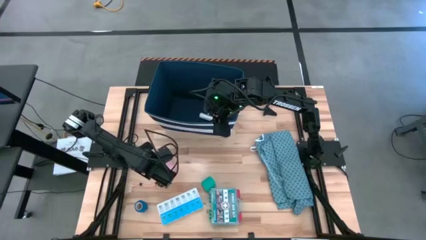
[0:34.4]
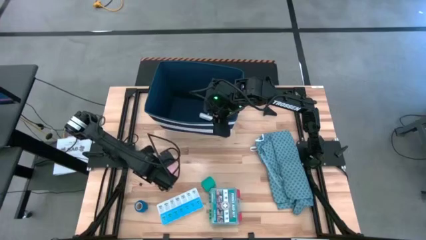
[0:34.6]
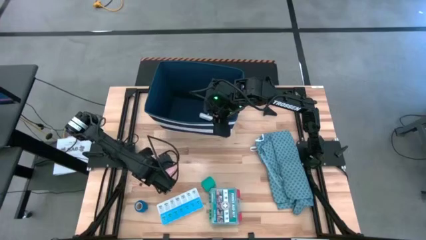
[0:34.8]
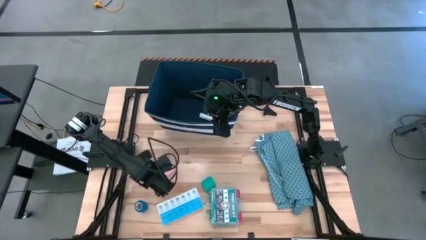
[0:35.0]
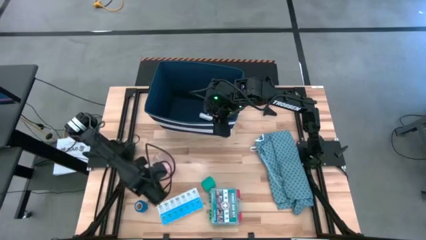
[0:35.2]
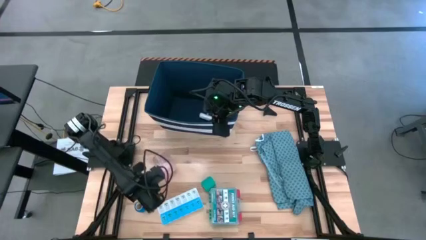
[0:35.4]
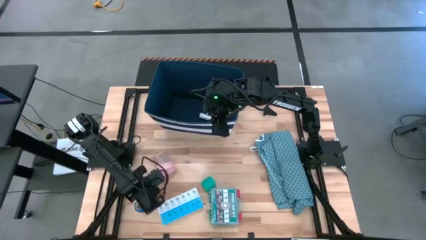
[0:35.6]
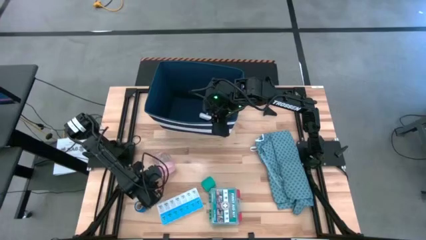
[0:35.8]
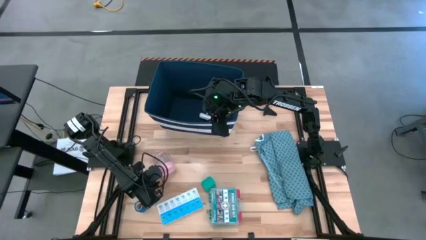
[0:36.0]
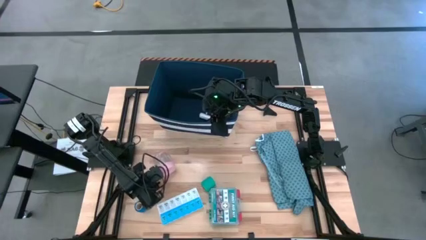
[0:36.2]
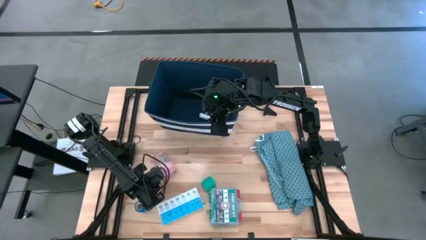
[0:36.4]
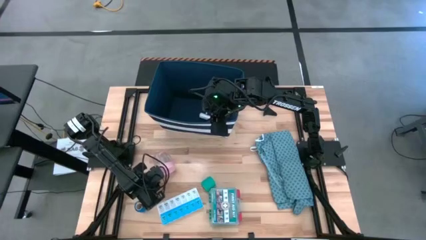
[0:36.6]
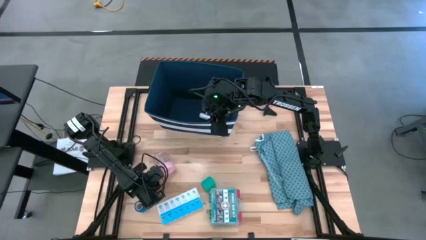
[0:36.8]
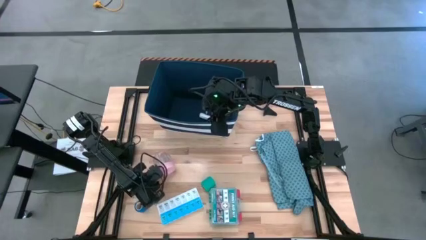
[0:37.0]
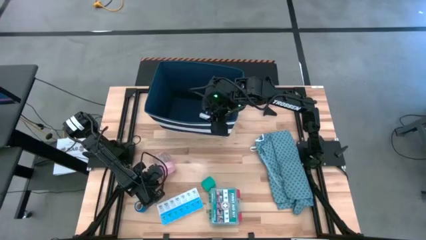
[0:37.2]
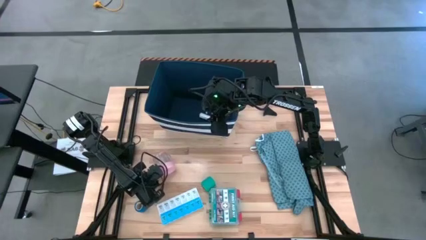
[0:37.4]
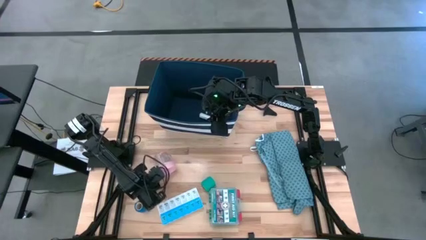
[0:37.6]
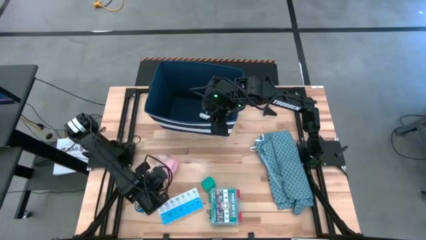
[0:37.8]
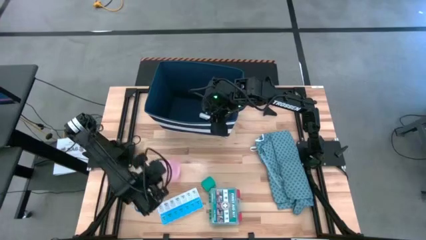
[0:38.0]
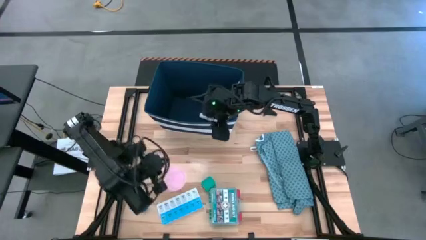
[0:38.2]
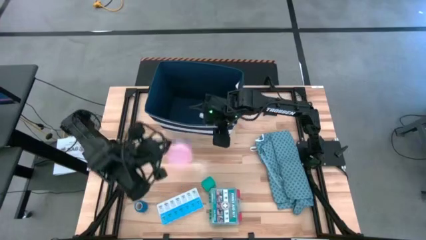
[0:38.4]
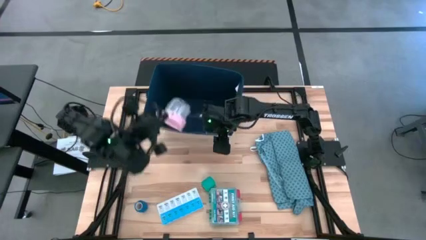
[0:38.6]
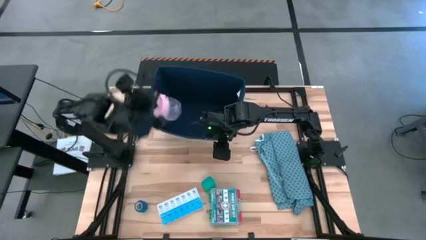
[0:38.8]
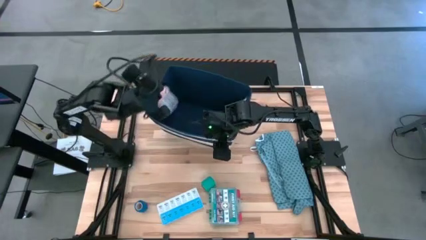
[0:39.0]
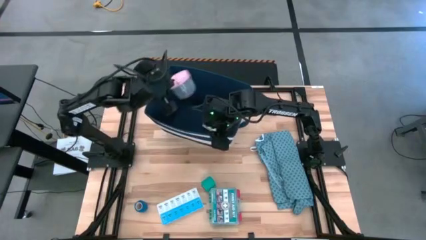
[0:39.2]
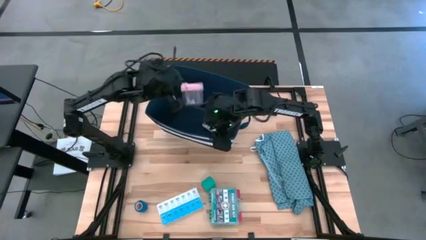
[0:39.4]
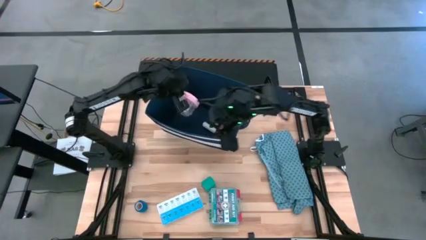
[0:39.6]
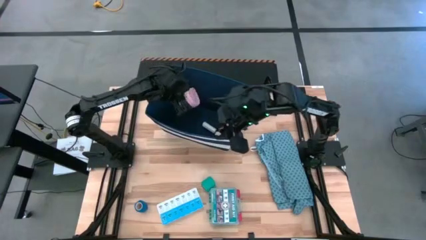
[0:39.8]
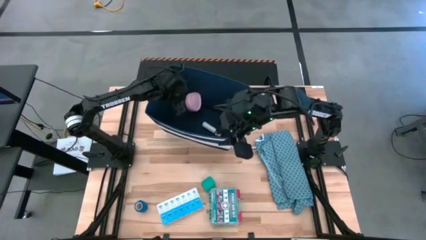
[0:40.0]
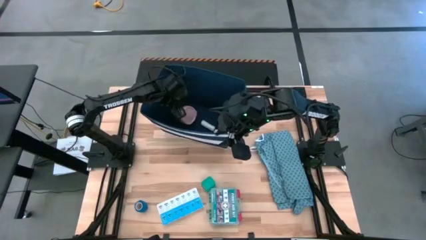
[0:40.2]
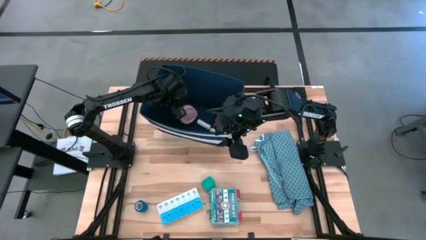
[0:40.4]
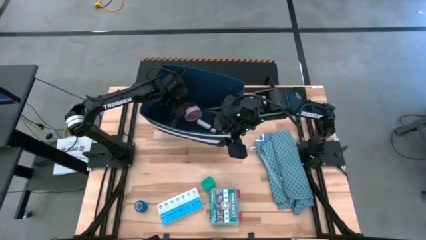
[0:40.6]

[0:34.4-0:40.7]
Task: Pick & place medical supplies in basket/bin
Put the pink tumbler into the laundry organizer

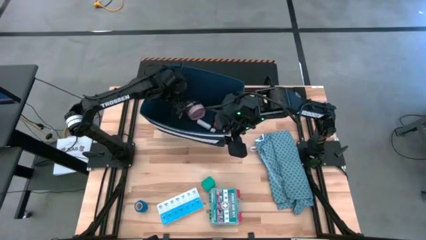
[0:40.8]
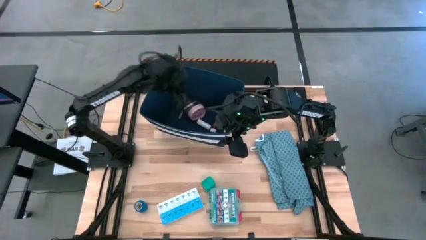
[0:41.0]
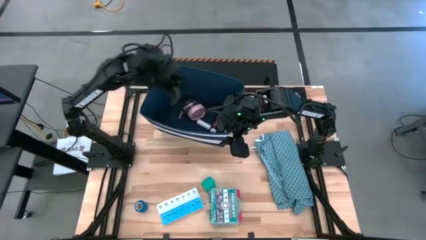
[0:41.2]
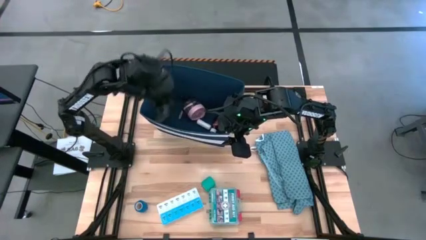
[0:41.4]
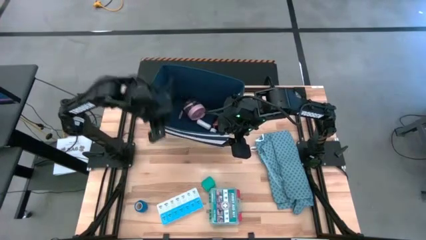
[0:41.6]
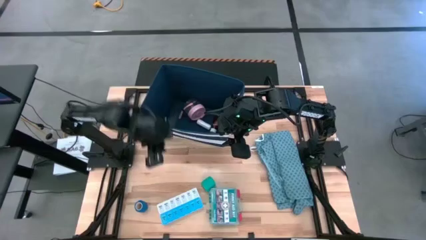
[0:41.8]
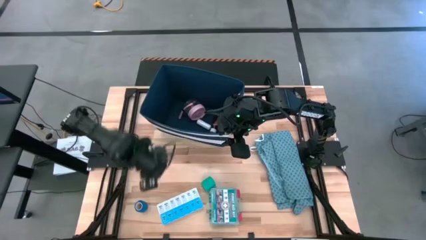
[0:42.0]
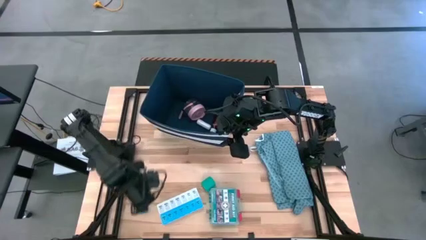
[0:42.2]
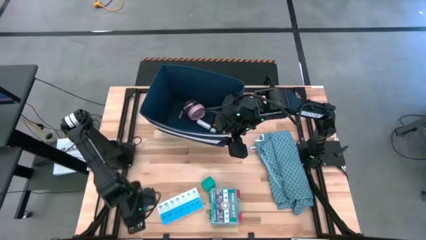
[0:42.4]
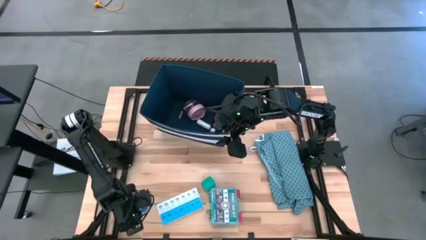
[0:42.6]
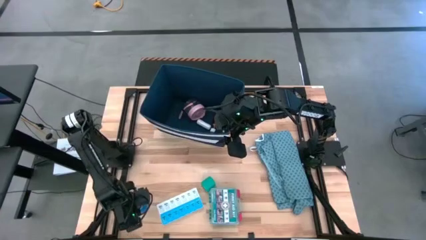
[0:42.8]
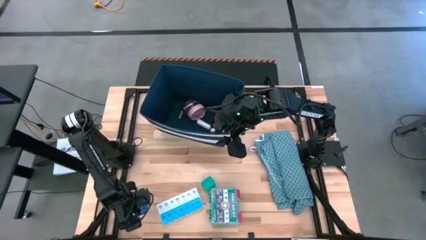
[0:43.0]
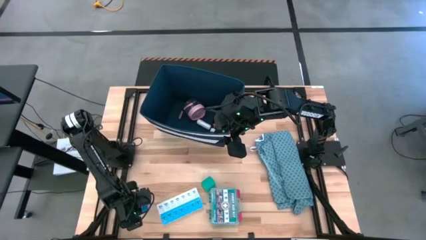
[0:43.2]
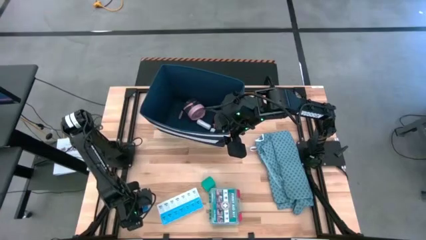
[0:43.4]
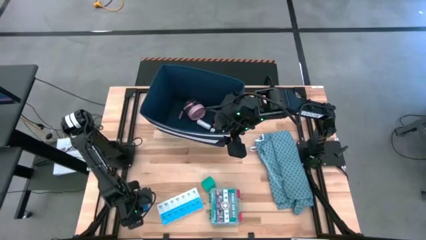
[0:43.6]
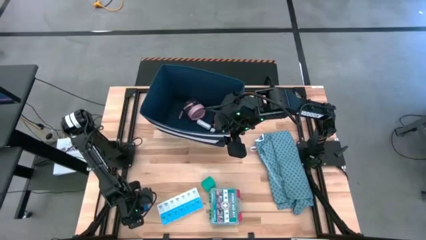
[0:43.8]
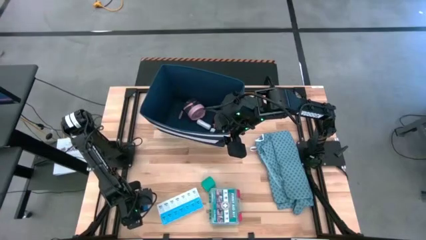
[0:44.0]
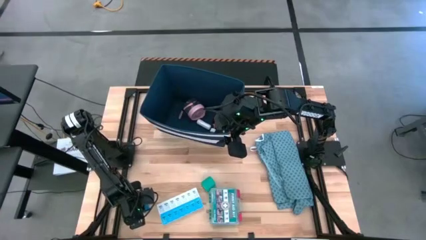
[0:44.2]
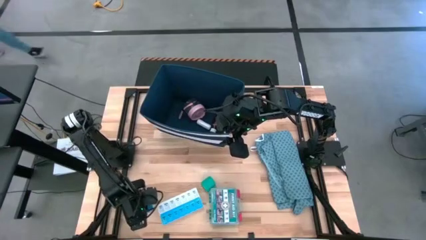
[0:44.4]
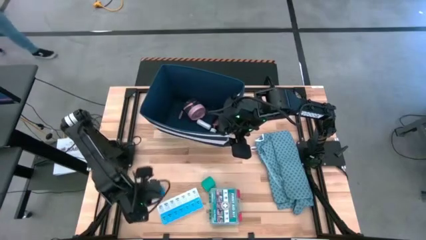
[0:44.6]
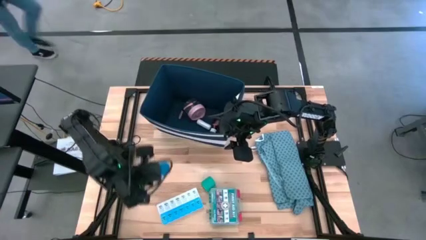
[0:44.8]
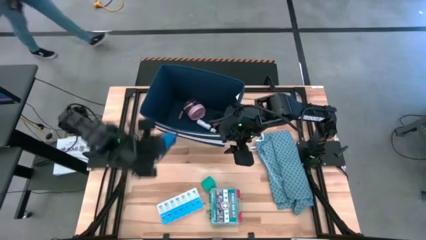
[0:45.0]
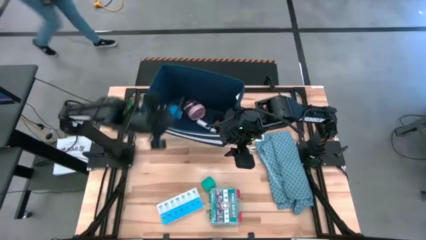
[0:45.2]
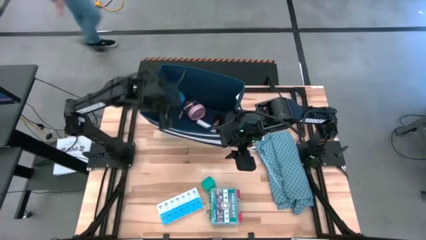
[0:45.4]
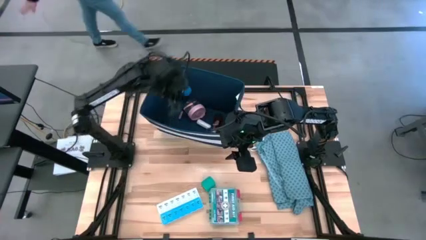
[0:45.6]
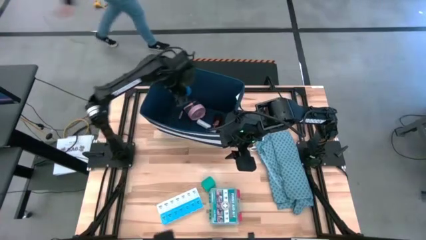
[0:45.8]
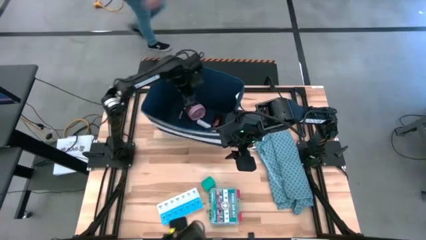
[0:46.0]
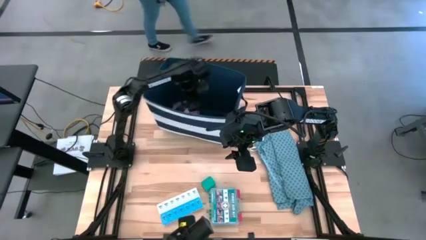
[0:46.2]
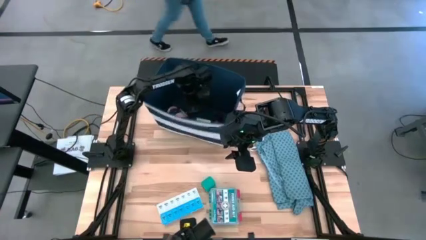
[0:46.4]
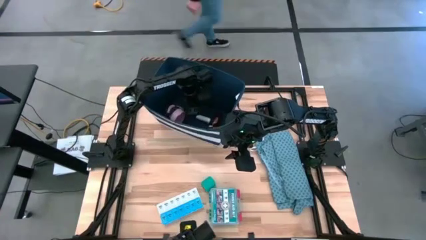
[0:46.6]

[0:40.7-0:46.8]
Put the blue bandage into the laundry organizer

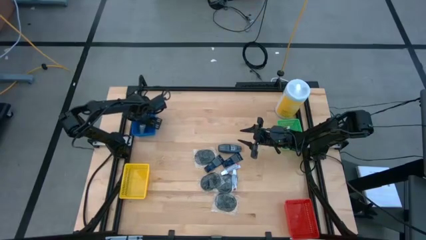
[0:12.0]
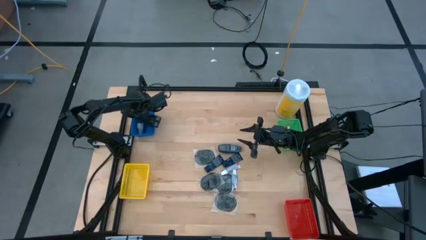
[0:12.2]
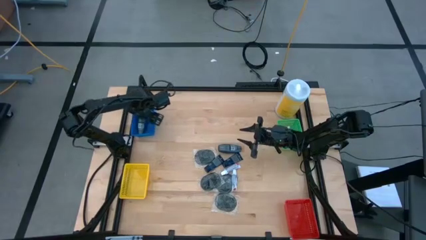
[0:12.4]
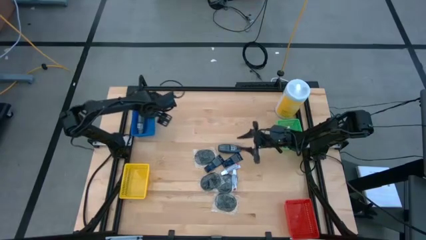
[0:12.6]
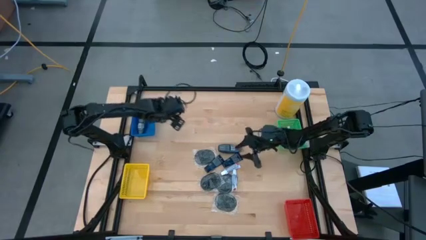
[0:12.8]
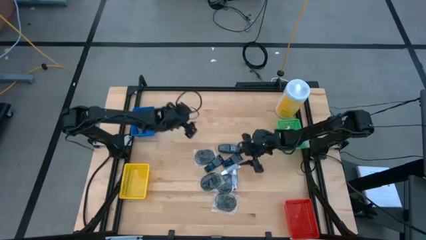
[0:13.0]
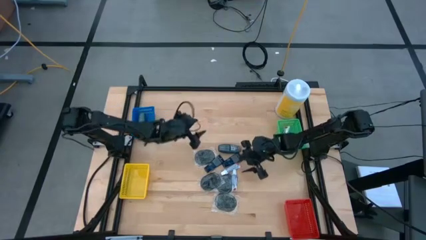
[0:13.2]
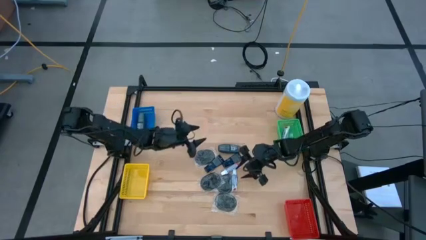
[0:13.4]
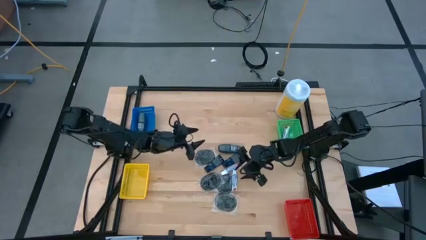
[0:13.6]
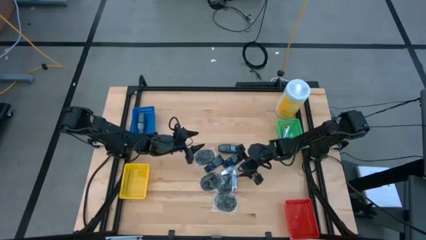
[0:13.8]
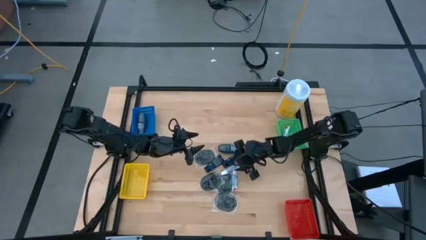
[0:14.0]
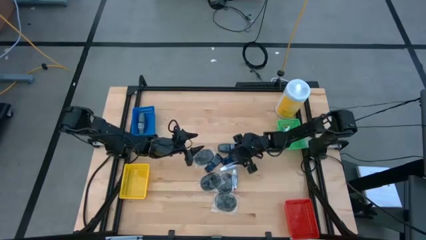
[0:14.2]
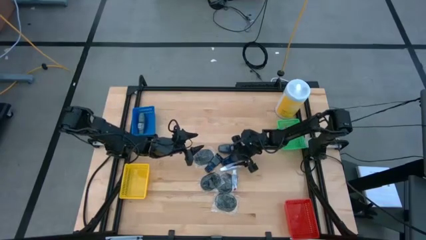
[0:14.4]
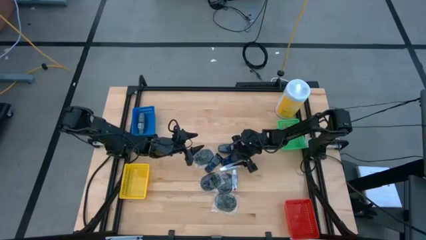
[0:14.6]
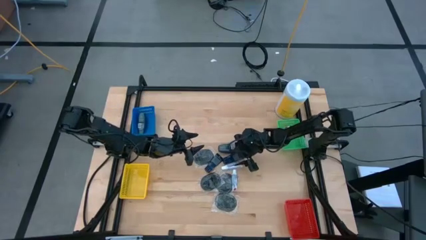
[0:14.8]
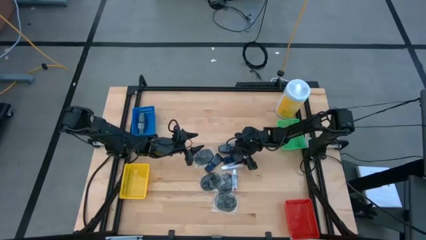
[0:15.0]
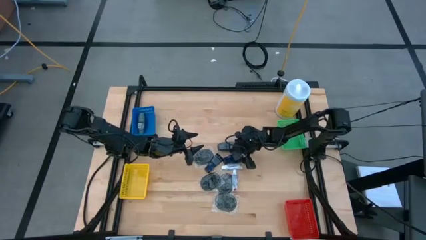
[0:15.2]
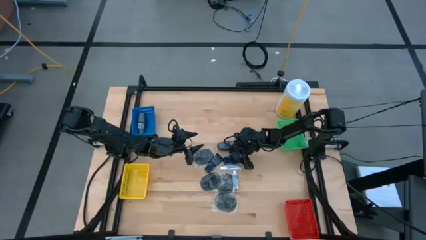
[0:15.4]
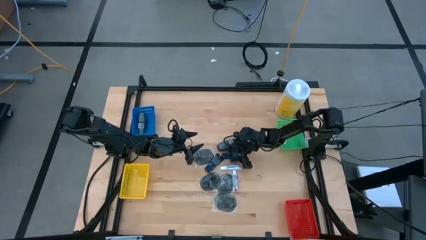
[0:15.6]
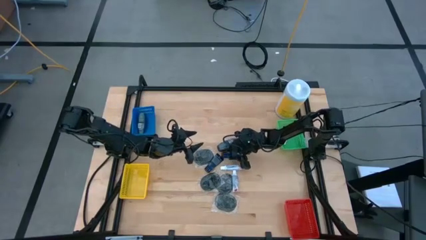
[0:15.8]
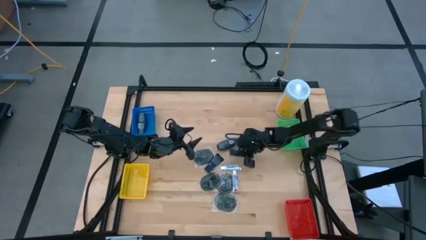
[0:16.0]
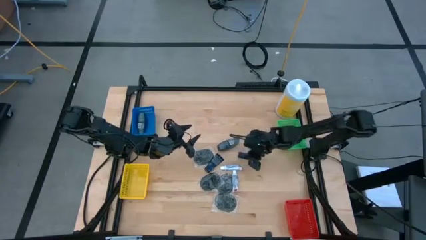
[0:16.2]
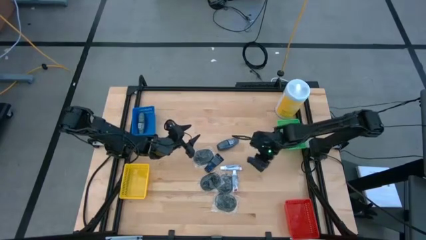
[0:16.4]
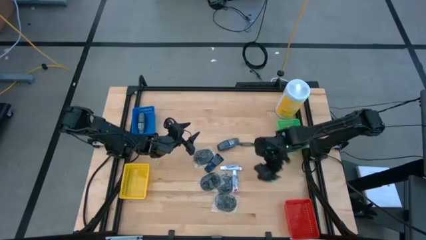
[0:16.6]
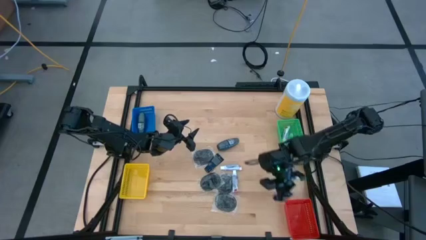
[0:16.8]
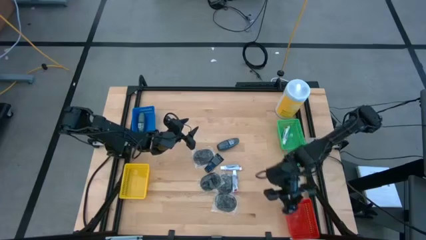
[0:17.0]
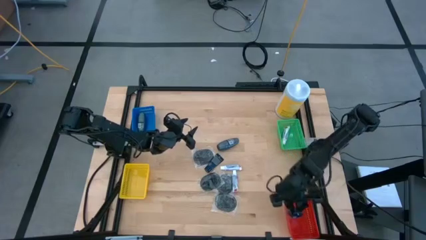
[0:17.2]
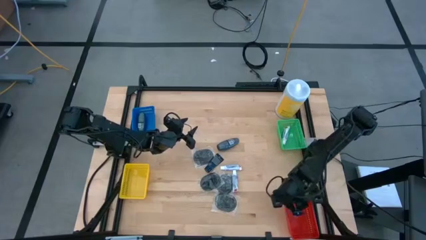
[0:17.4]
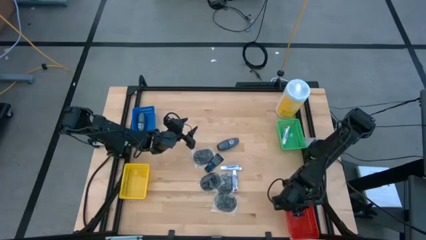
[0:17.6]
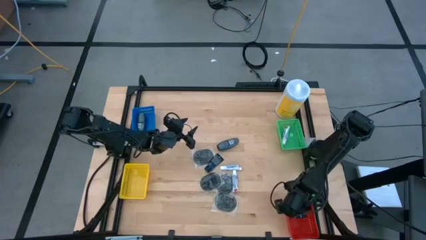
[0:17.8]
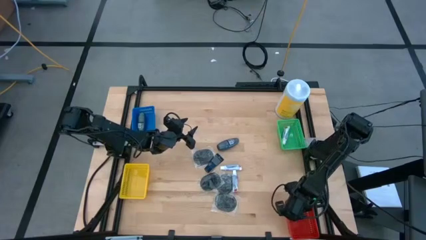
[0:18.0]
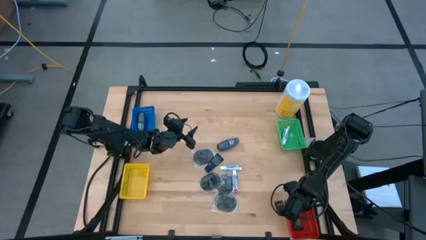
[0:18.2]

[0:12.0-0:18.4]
Task: Pick & Place Travel size toiletries
Put the blue shave cream into the red bin
